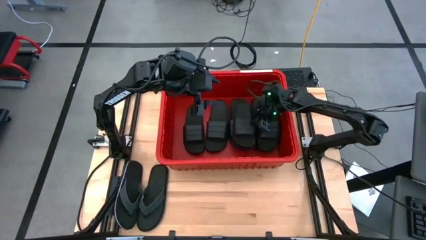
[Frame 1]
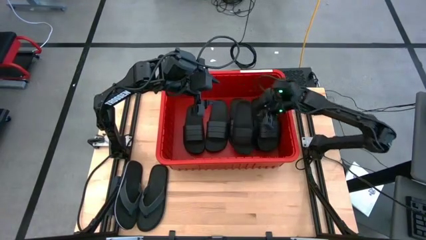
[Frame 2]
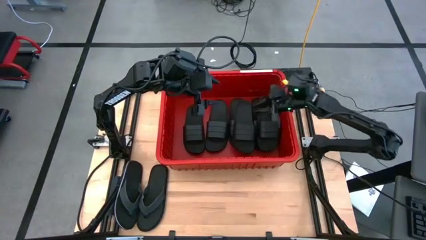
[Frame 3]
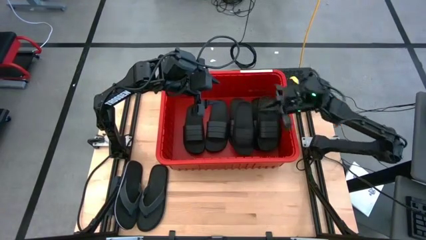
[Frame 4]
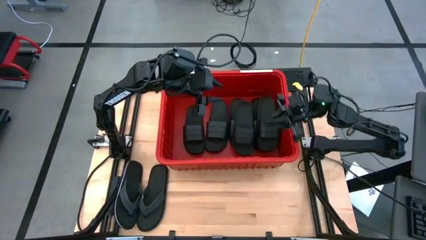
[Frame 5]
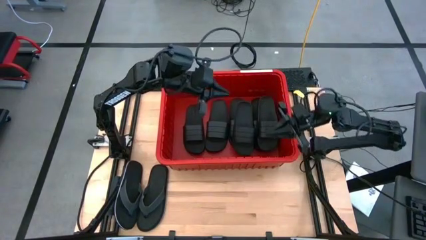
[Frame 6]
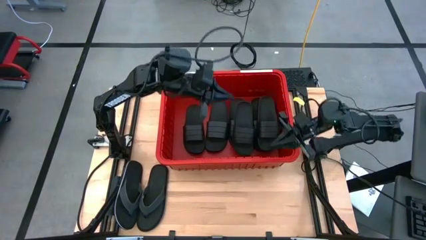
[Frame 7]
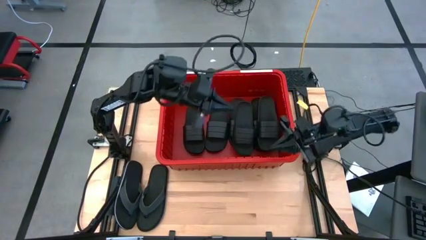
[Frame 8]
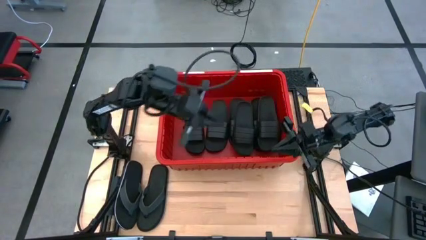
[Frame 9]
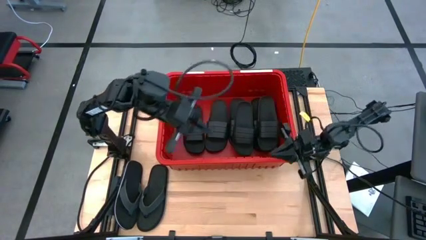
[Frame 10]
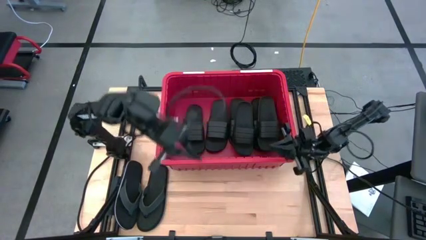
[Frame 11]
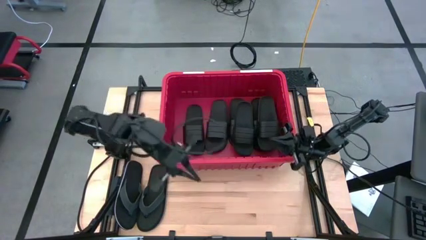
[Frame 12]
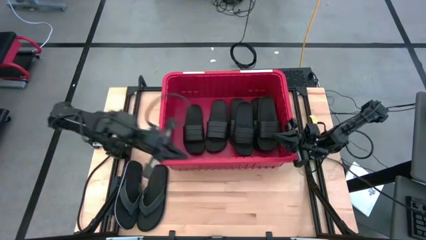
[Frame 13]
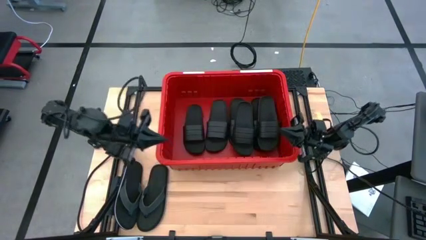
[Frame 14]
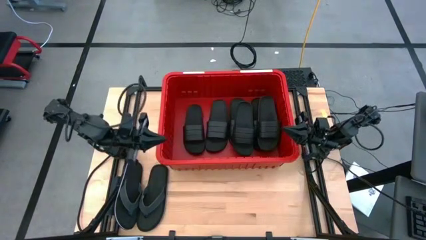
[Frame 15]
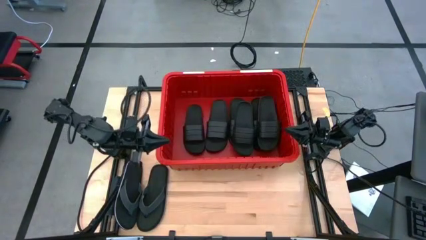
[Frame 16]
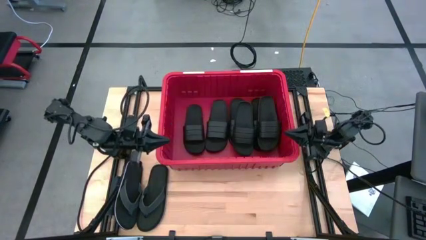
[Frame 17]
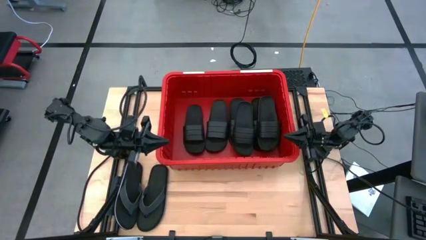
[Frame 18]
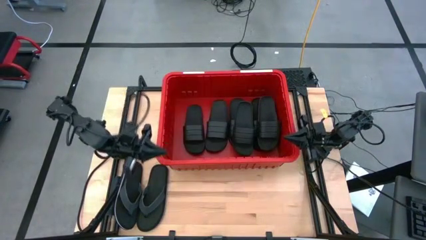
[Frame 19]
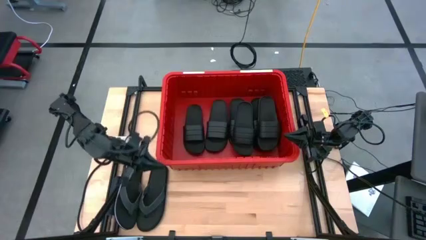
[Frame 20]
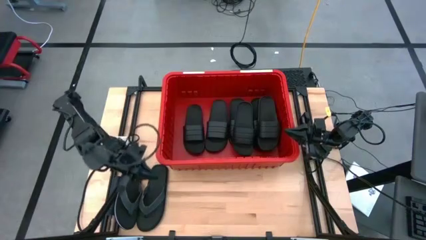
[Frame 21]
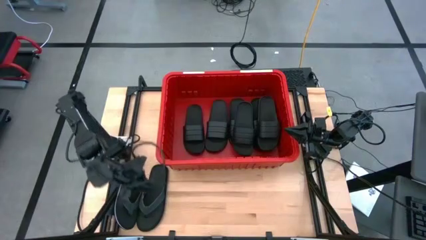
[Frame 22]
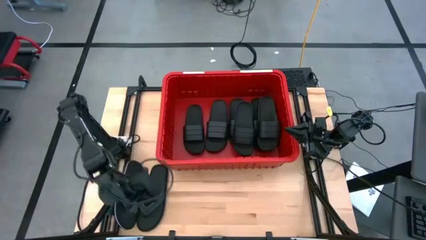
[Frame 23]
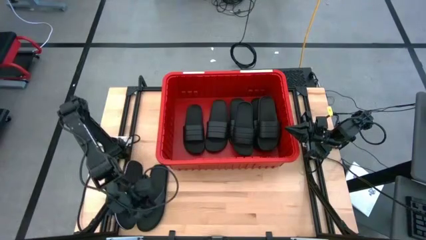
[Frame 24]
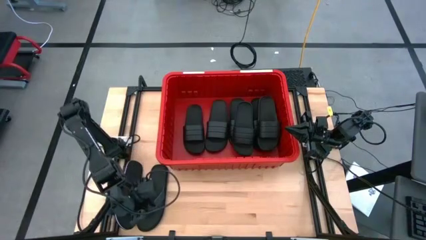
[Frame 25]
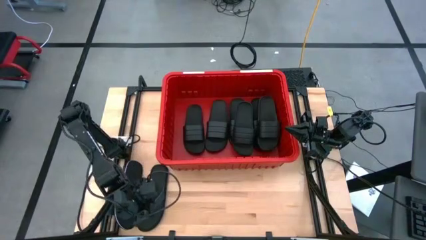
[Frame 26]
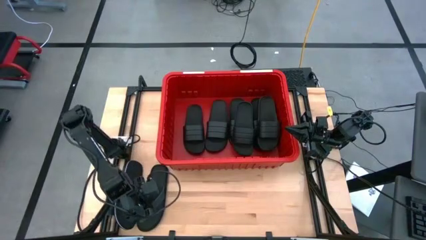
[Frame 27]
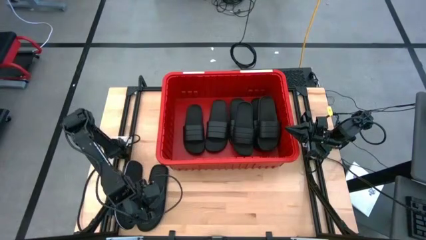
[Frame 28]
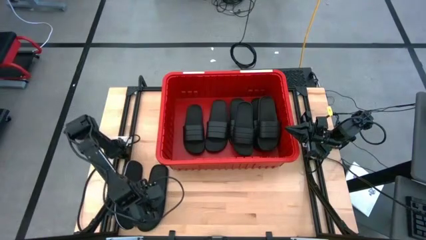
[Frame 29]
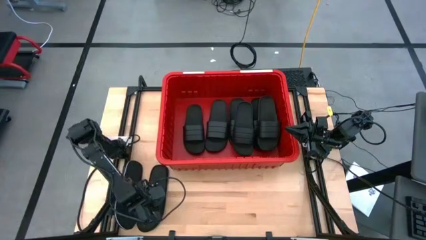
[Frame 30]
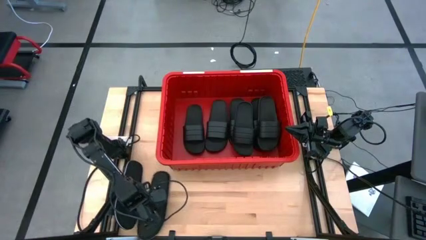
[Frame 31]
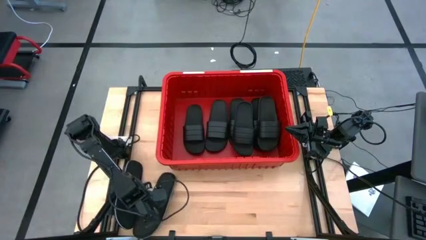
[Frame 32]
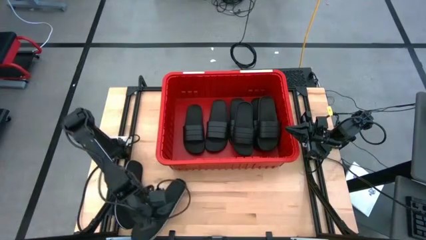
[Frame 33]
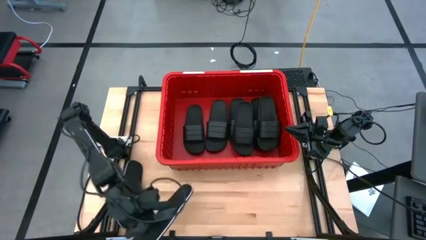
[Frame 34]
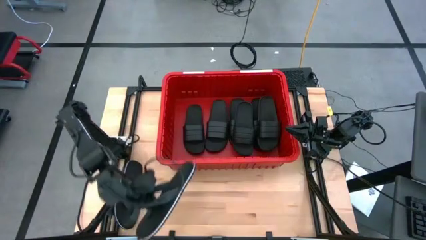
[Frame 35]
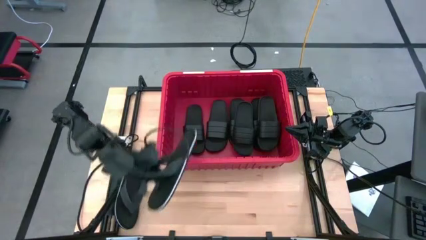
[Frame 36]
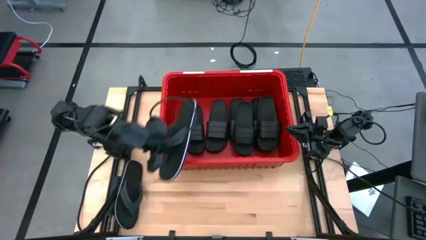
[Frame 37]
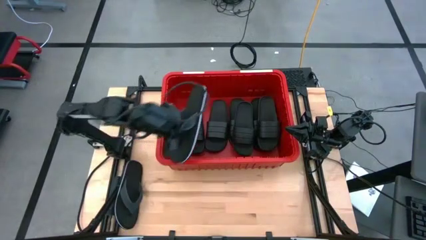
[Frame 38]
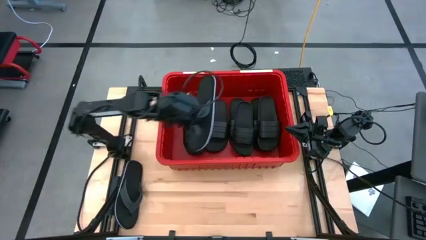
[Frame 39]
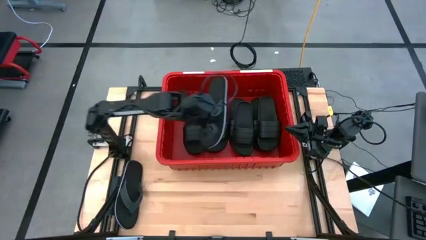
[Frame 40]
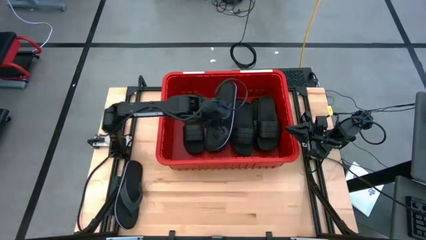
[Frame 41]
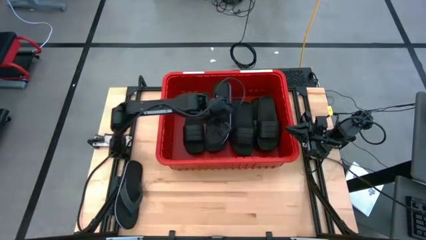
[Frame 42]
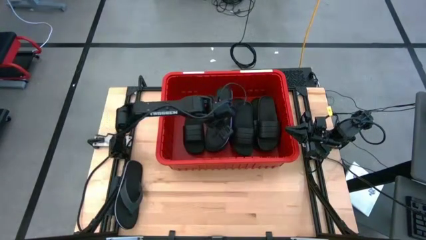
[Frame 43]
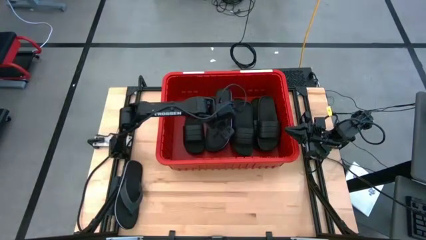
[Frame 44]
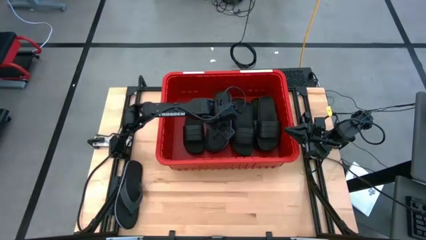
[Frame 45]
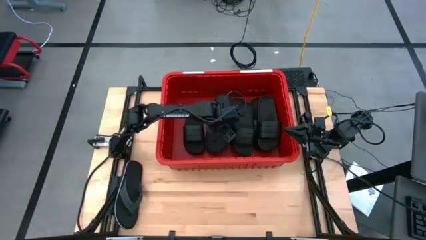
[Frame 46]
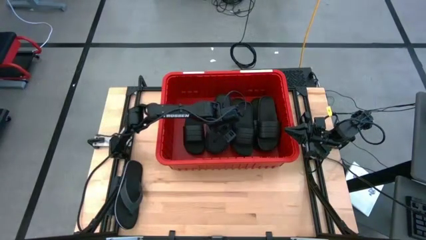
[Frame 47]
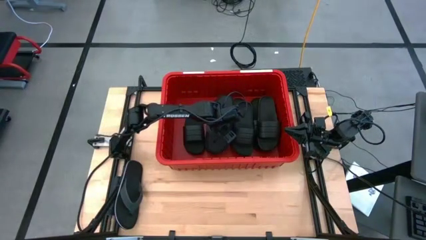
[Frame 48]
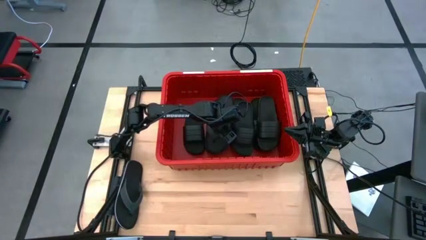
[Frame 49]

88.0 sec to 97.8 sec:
Task: Pick and place slides into bin
Put the right black slipper into the red bin

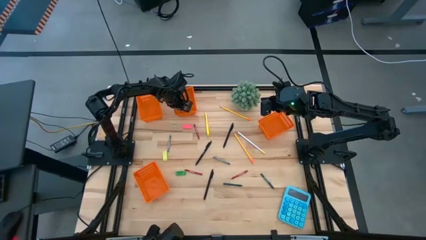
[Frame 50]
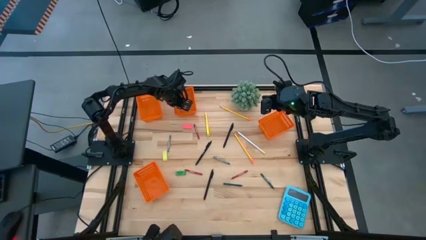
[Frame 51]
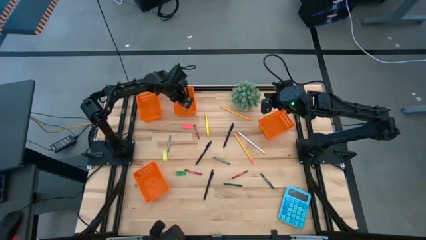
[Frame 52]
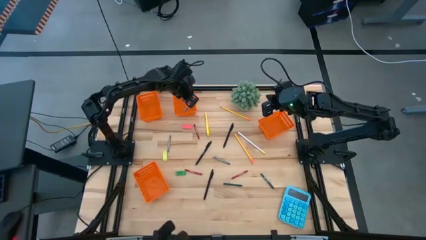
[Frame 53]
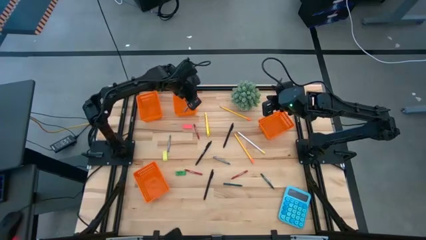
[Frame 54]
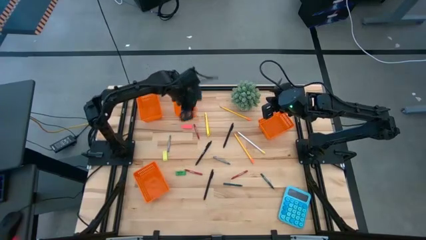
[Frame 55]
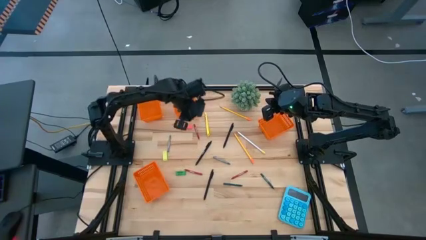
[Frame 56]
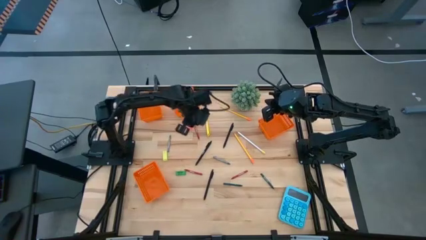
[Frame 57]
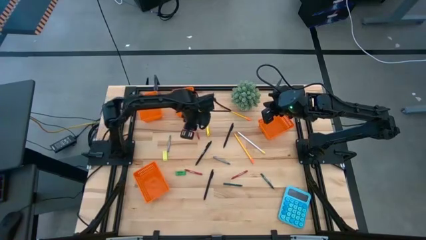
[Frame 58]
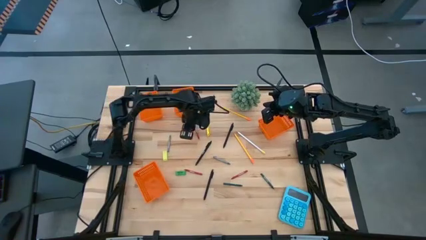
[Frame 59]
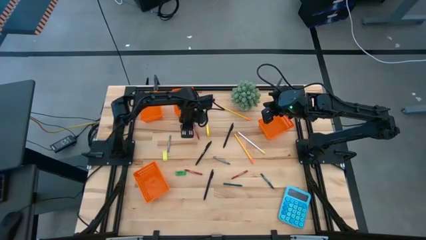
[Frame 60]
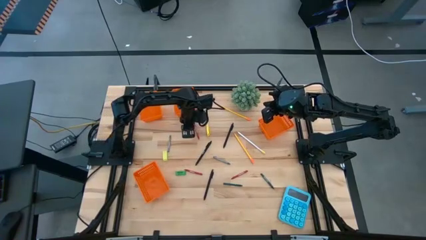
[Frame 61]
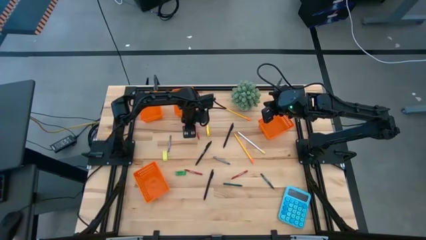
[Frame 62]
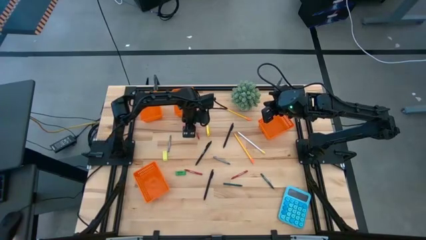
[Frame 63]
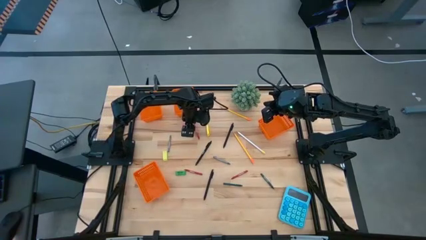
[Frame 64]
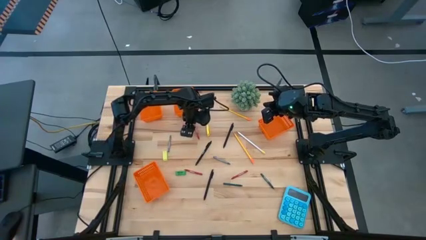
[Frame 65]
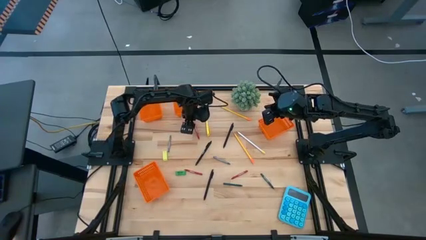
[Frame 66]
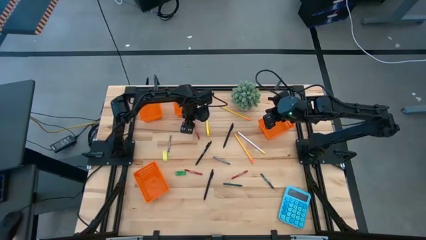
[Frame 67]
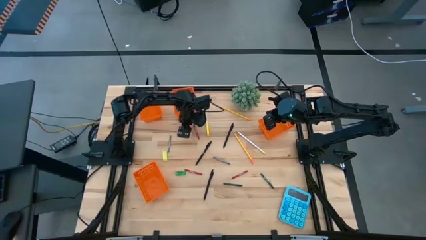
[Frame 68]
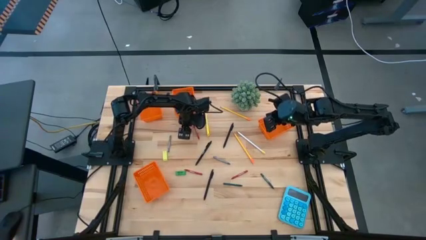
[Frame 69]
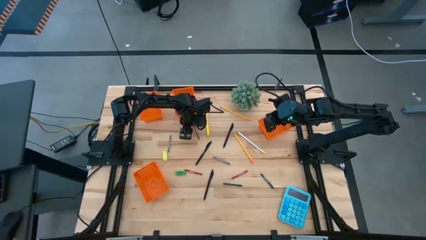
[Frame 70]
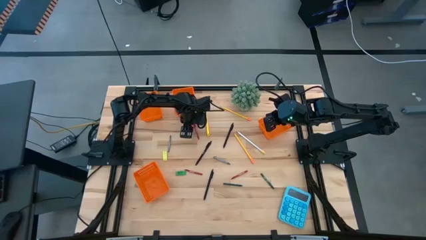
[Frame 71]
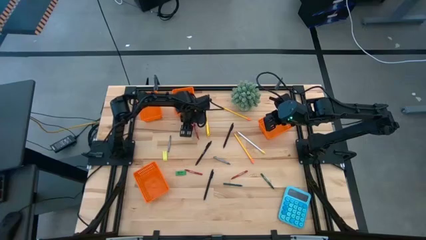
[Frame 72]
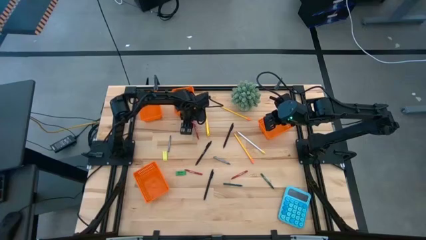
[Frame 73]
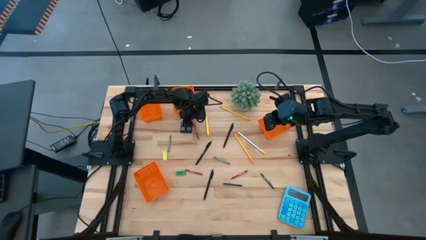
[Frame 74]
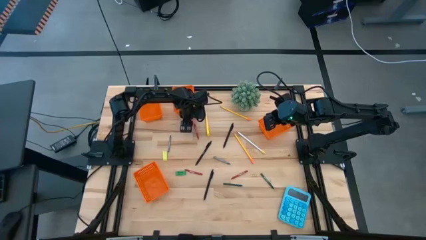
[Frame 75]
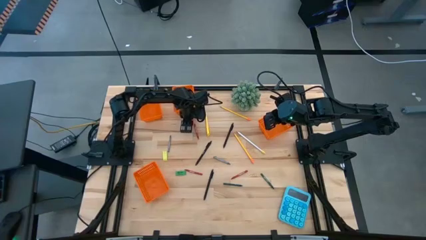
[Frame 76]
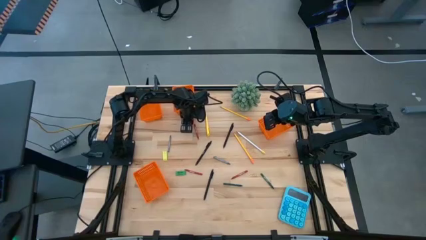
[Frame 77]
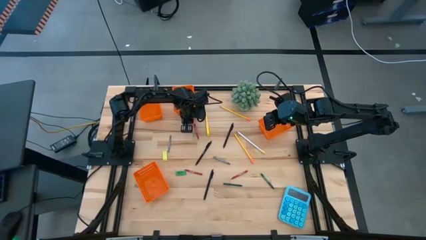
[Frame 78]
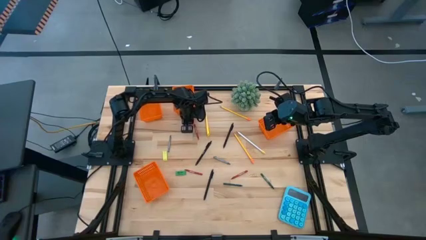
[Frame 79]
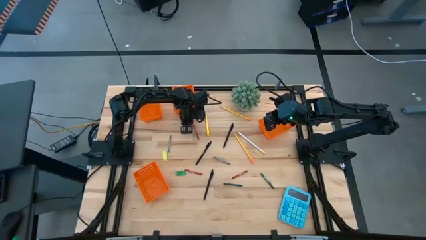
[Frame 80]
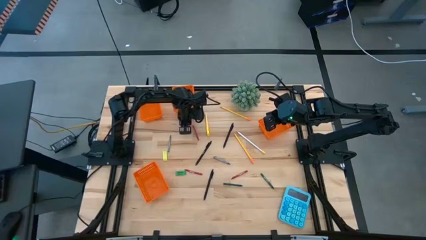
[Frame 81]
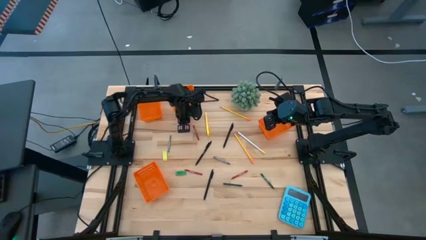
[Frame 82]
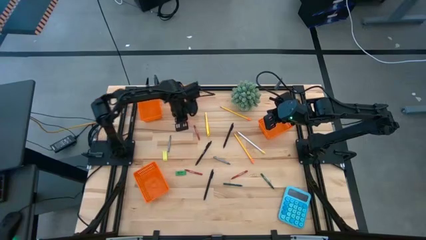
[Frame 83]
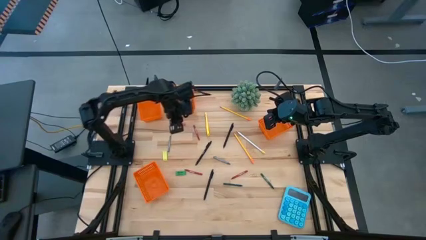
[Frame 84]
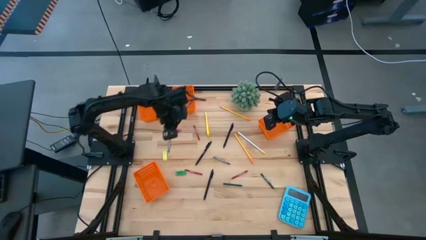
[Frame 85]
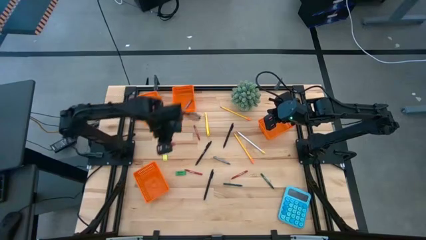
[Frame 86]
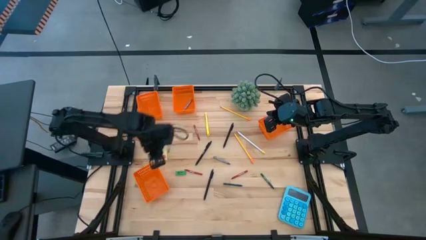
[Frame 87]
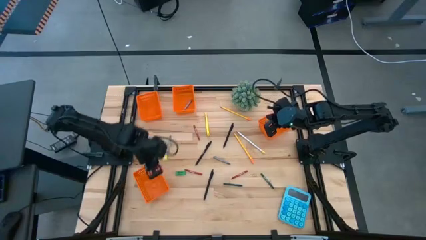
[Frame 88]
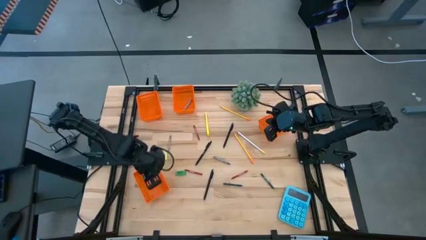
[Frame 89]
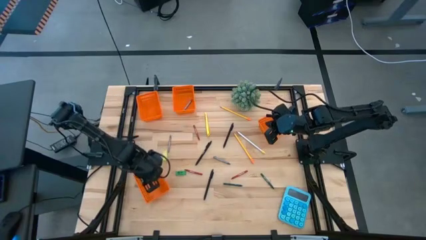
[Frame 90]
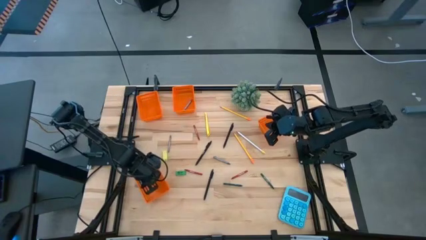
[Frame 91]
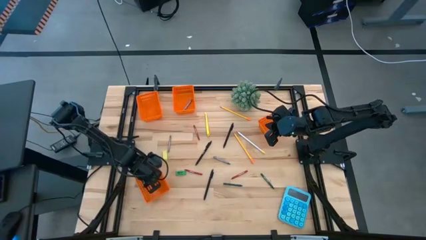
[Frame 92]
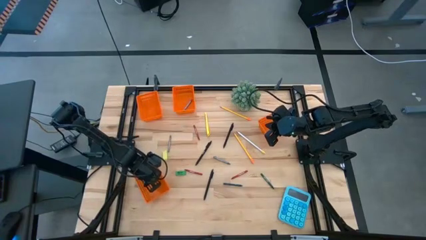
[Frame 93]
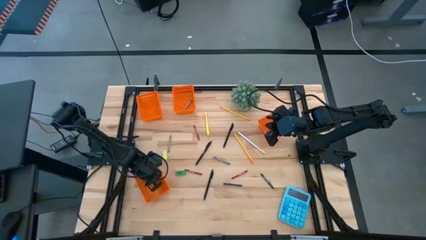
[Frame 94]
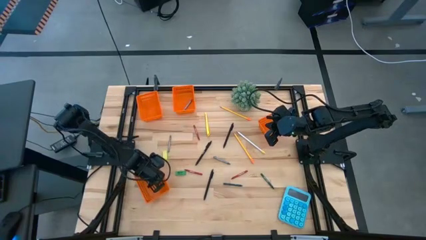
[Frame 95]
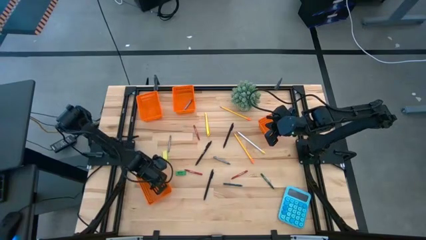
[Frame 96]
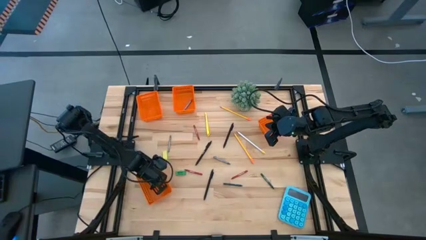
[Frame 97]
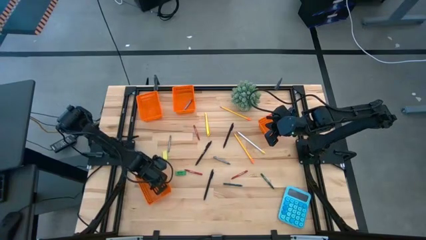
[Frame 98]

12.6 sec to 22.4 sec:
Task: Sort crayons/erasers/pens/pencils in bins
Put the pink eraser into the bottom orange bin
